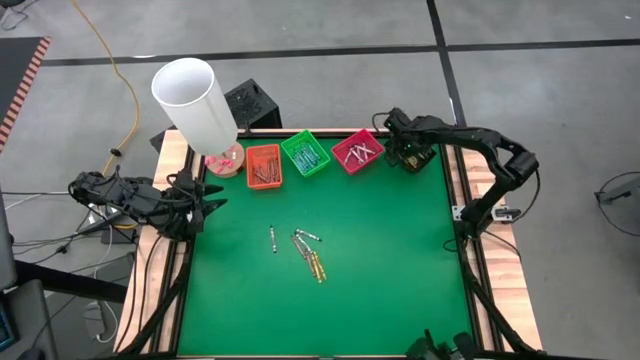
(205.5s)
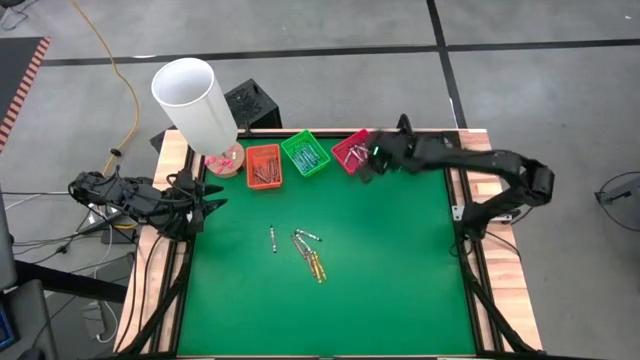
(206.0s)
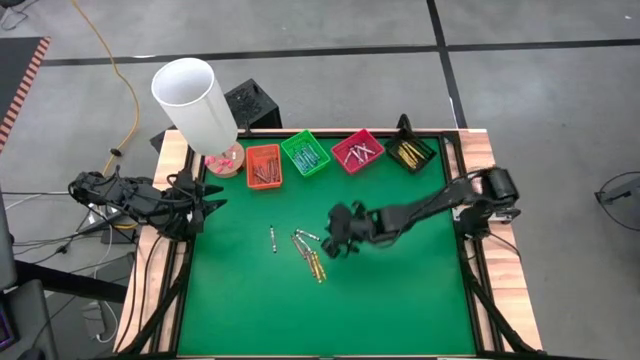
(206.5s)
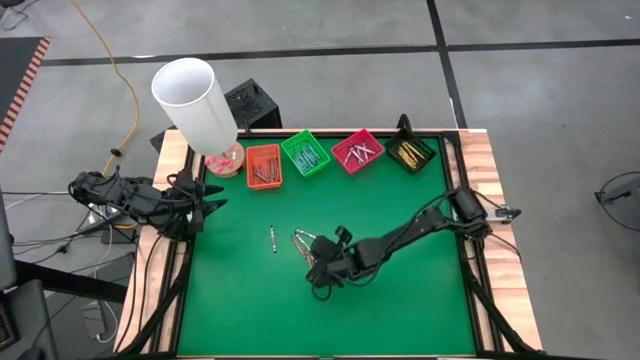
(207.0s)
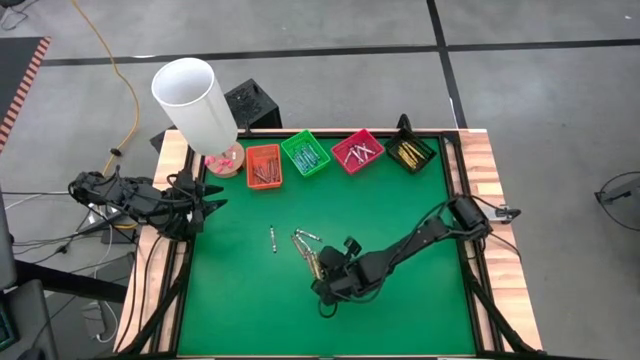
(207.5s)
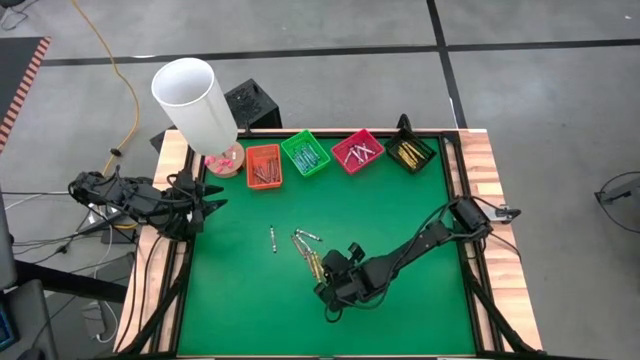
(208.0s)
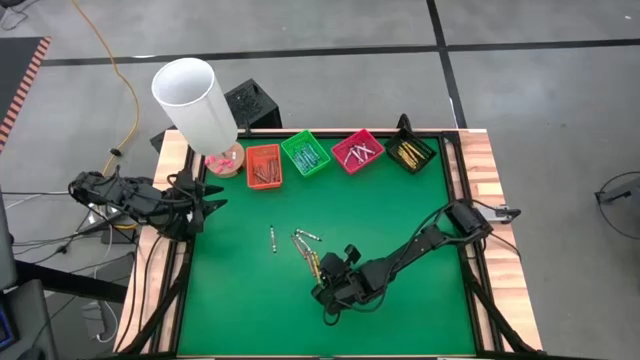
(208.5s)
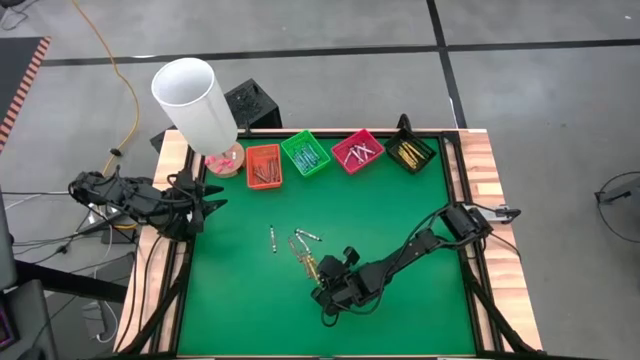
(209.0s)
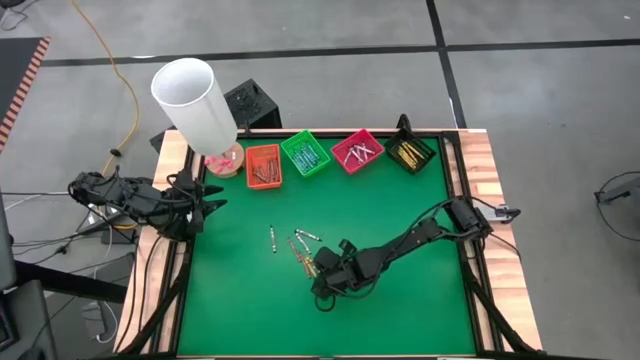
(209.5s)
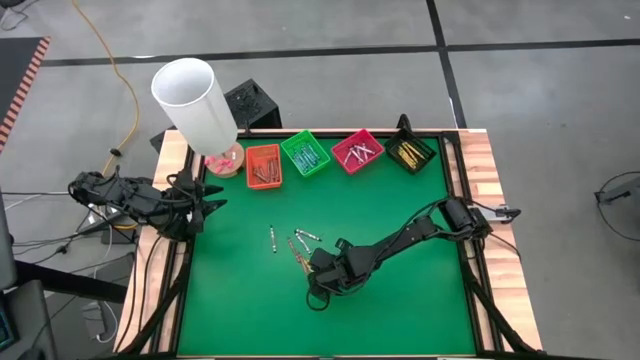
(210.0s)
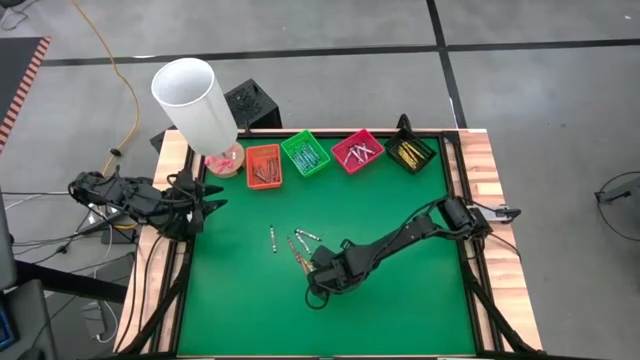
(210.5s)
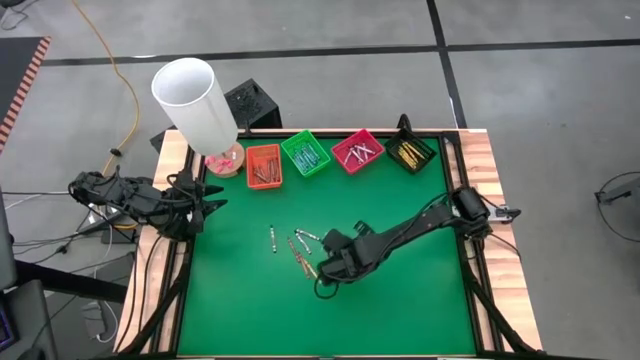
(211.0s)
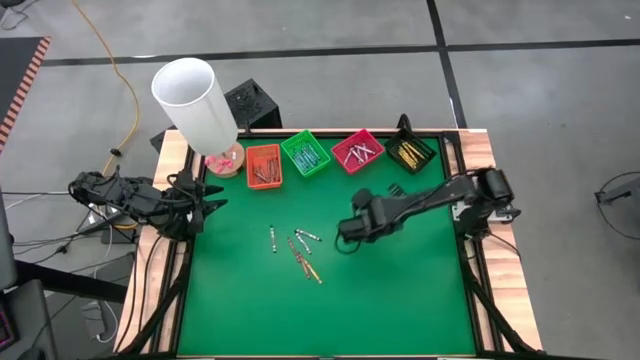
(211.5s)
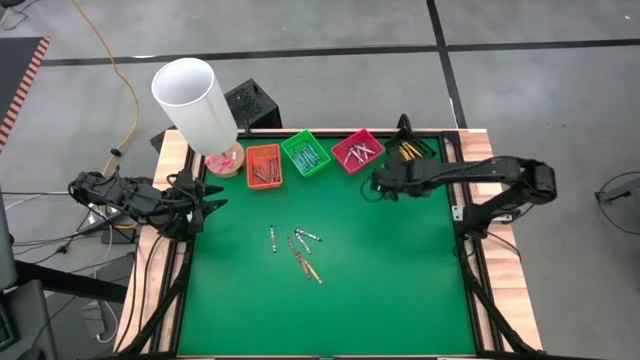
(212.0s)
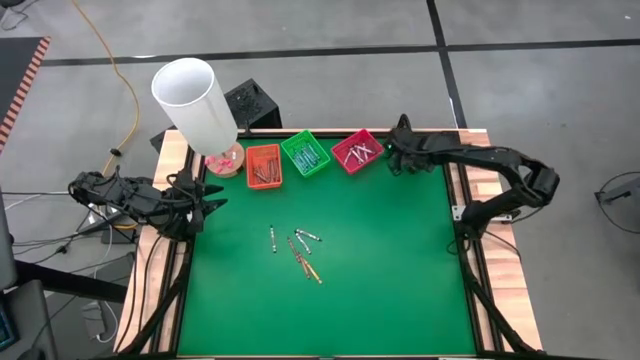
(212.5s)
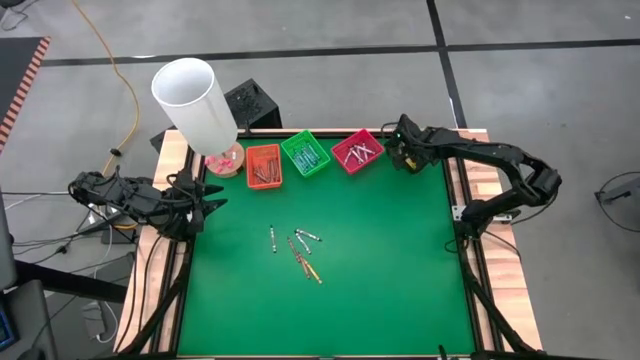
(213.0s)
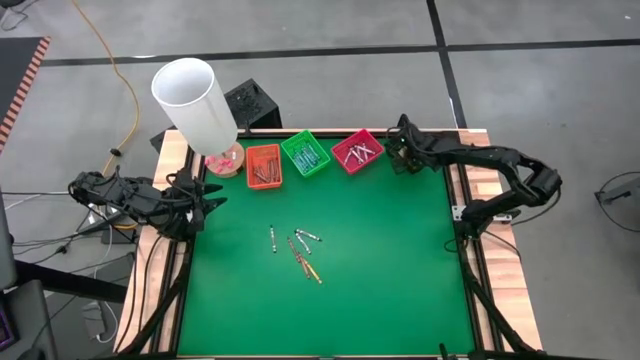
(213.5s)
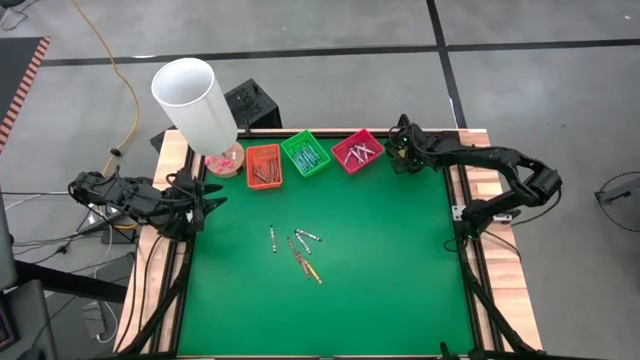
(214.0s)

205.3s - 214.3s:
Task: Sort crayons
Put the yellow/green crayon into the black bin

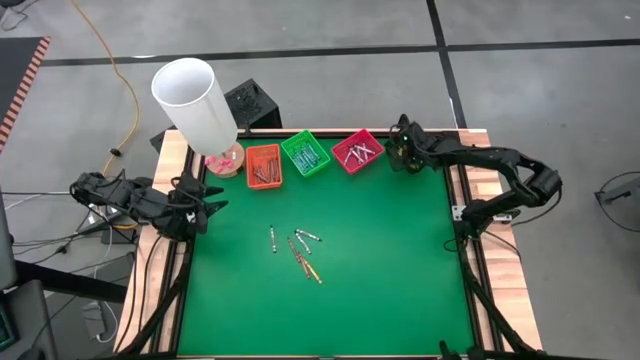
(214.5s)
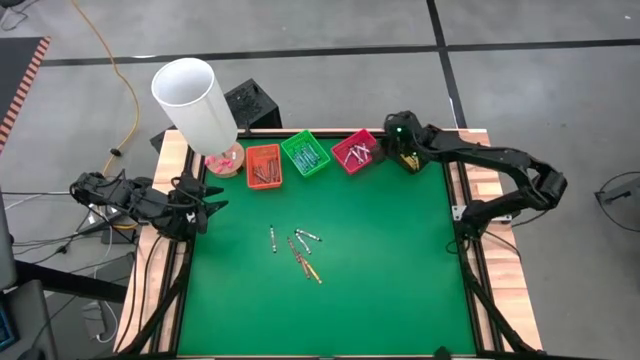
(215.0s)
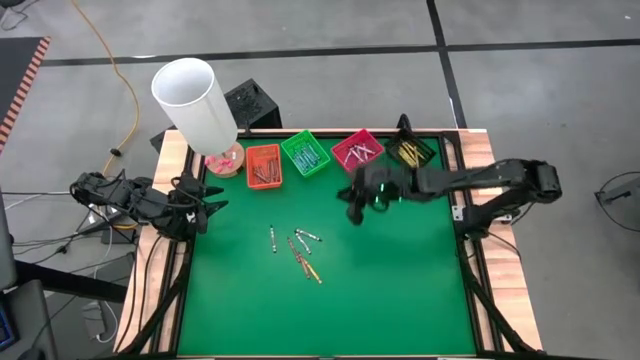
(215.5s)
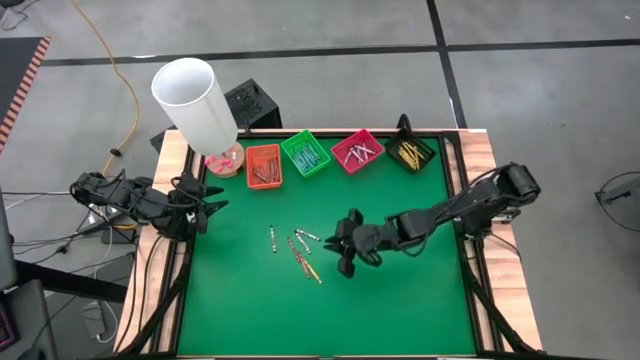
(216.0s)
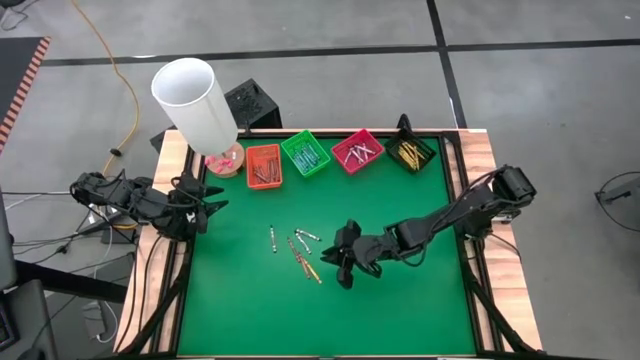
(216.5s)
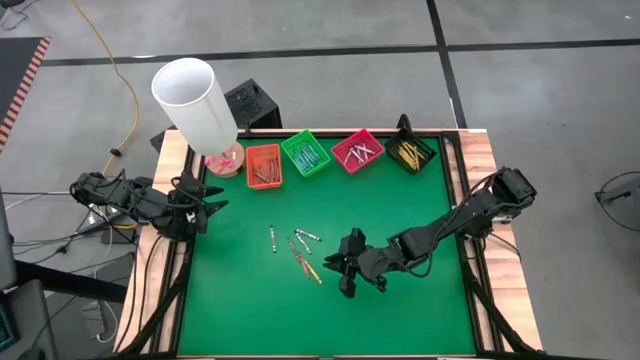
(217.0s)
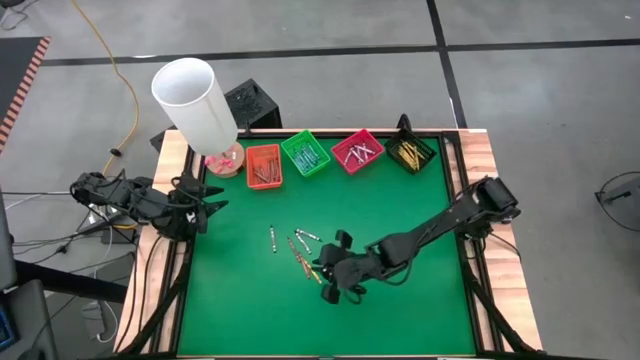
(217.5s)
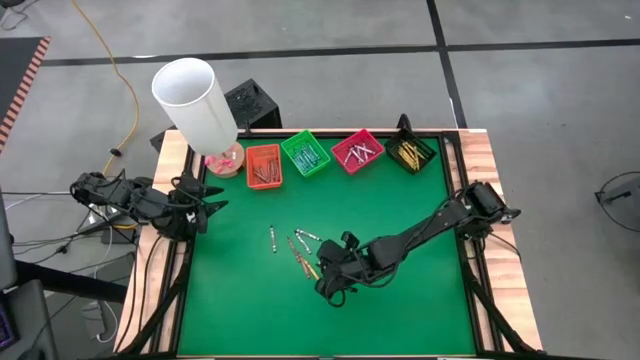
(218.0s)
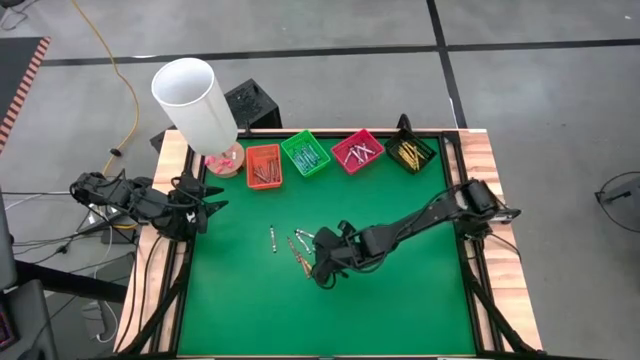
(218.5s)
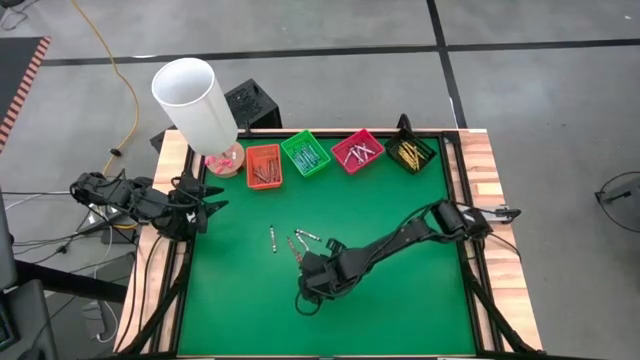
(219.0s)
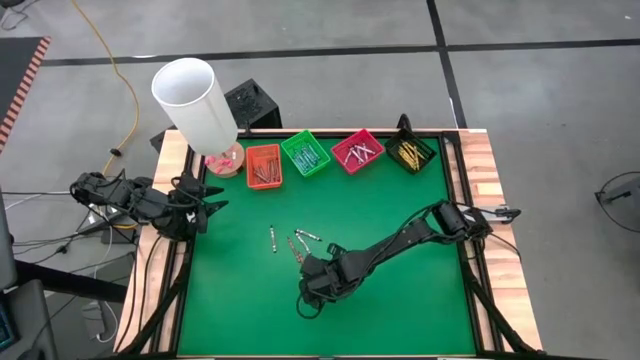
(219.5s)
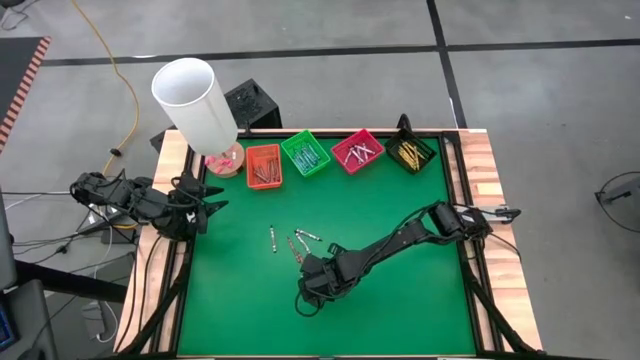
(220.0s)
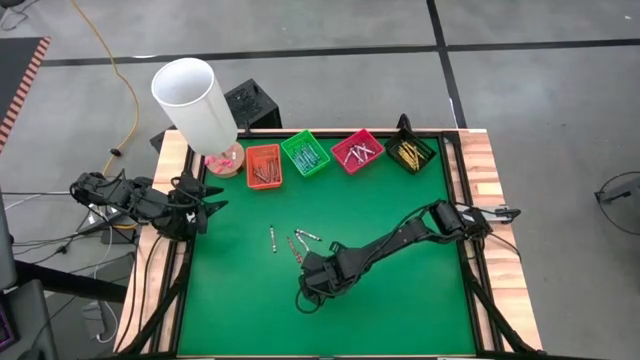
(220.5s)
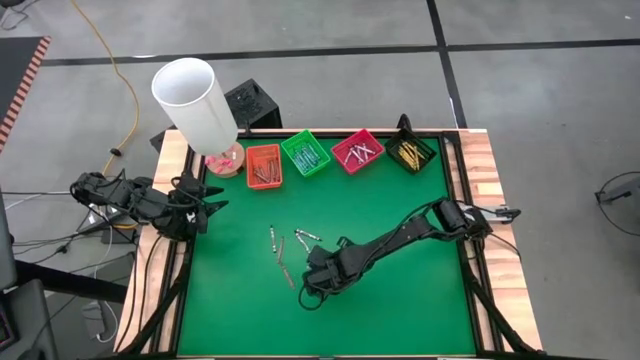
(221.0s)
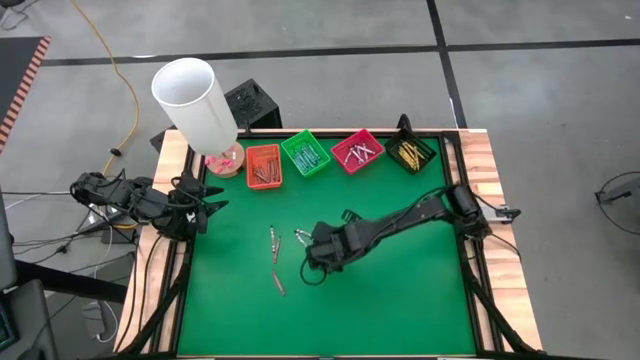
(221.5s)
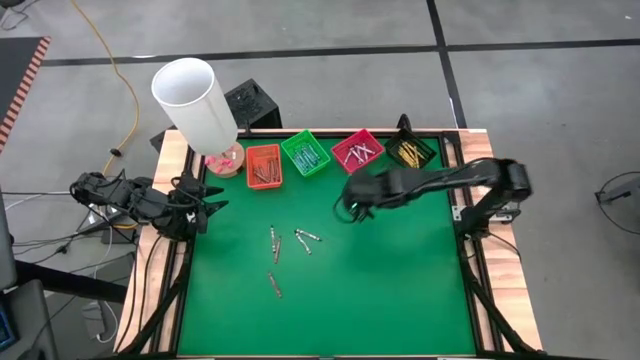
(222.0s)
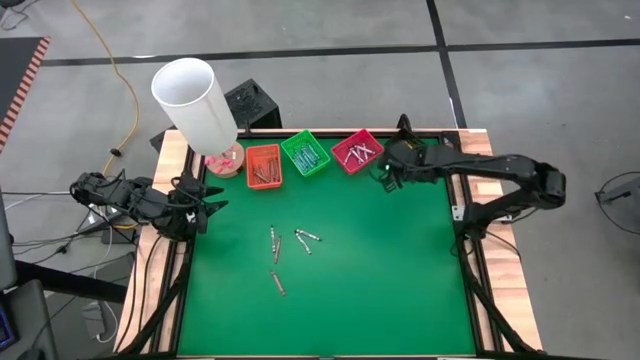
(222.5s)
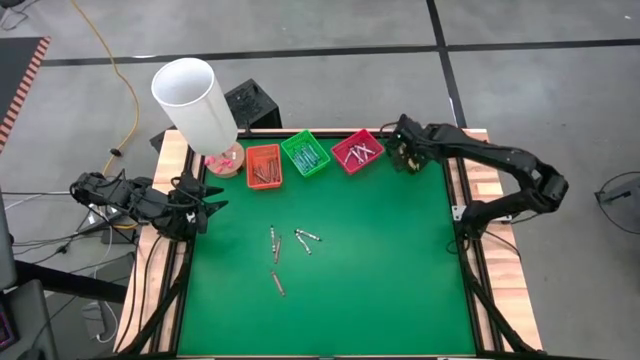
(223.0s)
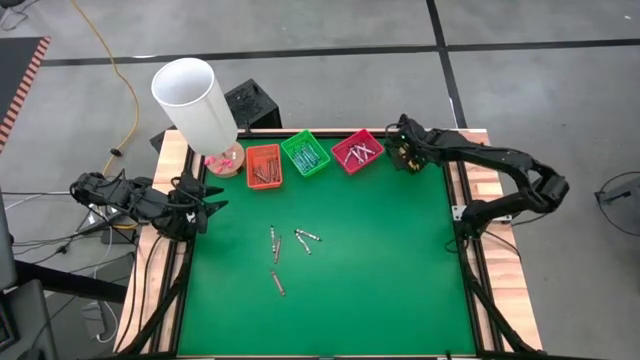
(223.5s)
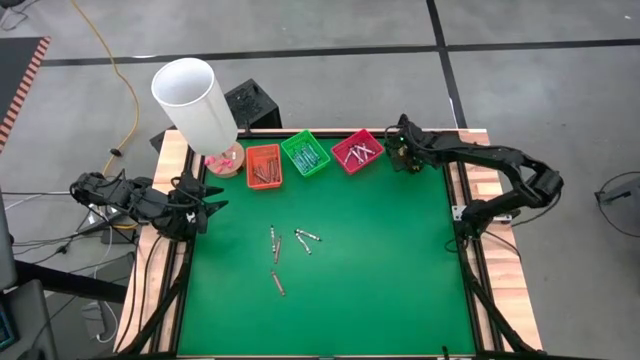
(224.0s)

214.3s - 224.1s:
Put the yellow/green crayon into the black bin

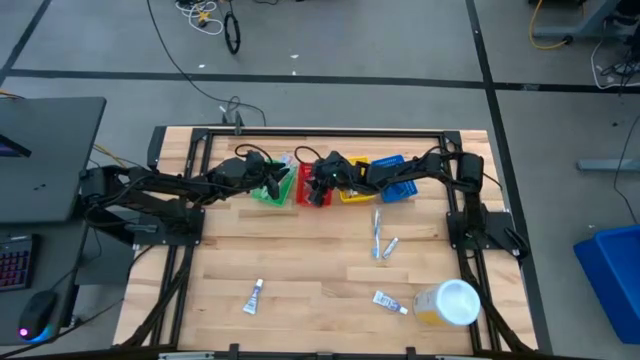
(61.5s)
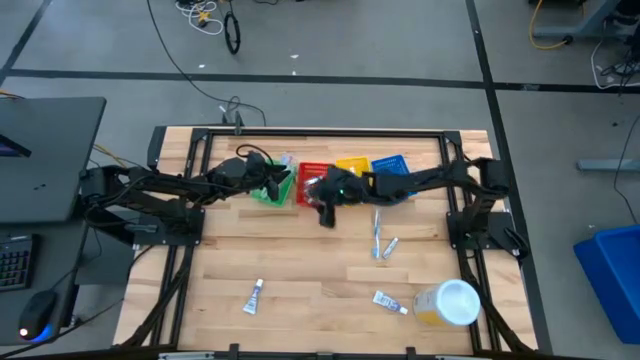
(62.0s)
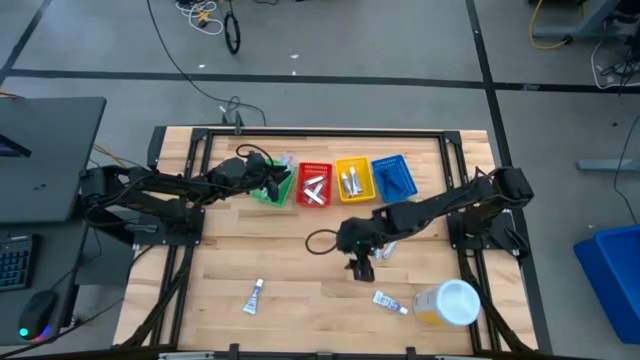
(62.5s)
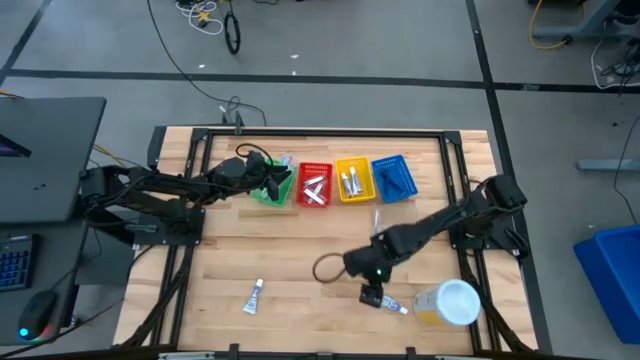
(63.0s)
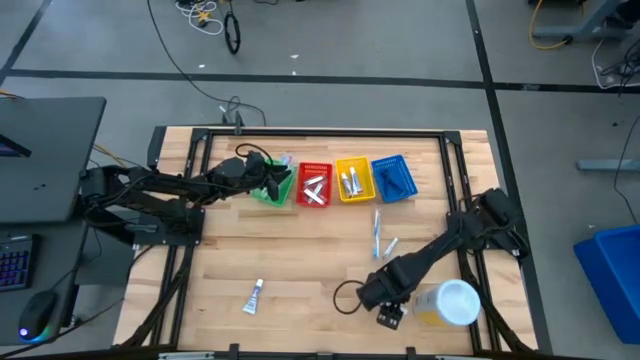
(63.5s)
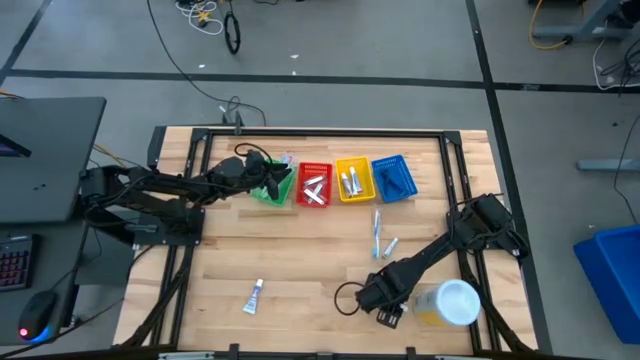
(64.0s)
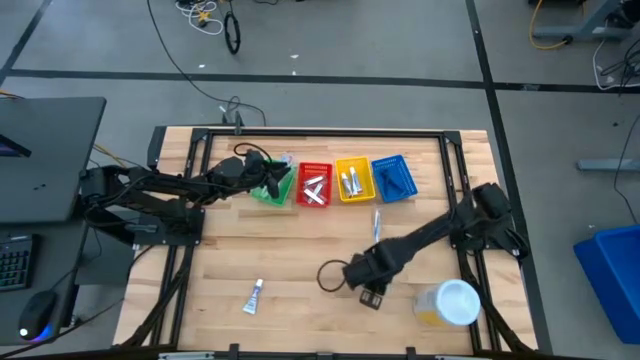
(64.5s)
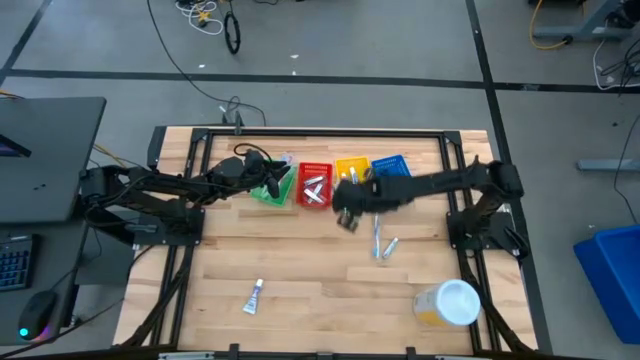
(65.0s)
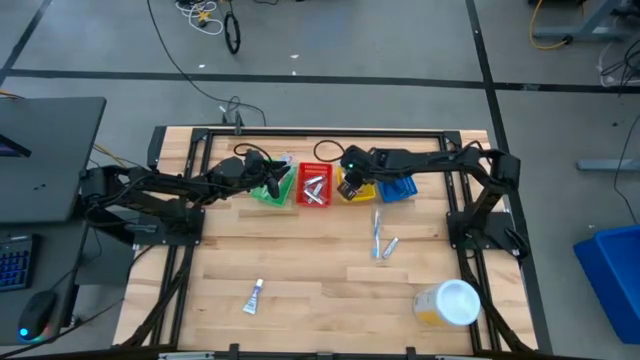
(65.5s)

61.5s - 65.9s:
Task: Pick & Place Travel size toiletries
Put the white toothpaste into the yellow bin
